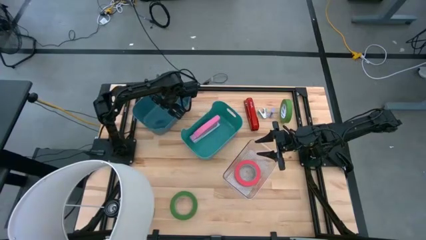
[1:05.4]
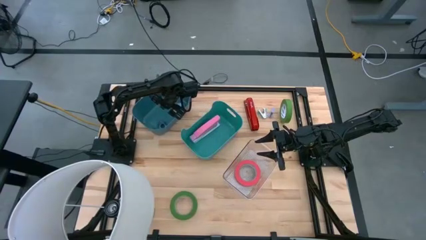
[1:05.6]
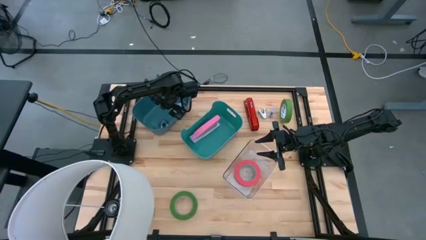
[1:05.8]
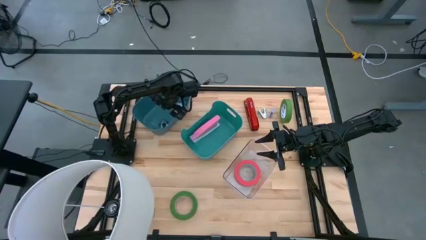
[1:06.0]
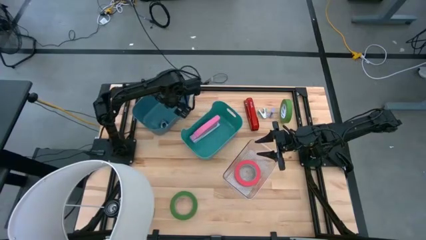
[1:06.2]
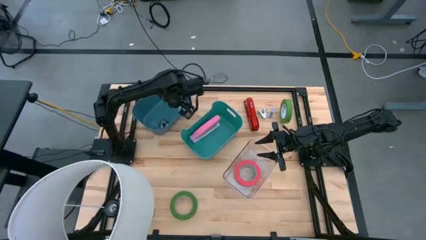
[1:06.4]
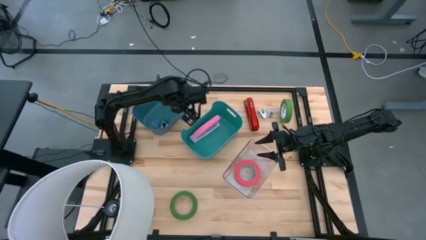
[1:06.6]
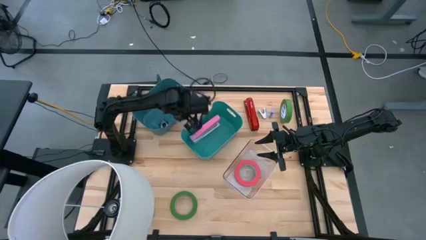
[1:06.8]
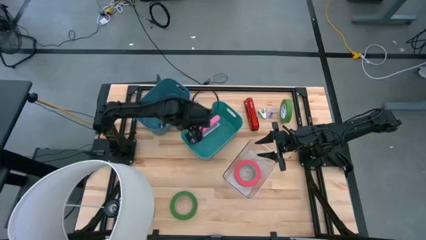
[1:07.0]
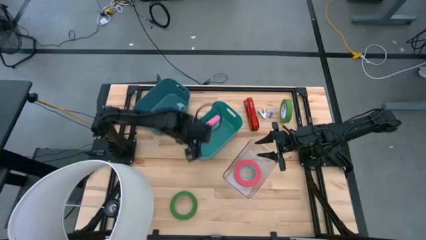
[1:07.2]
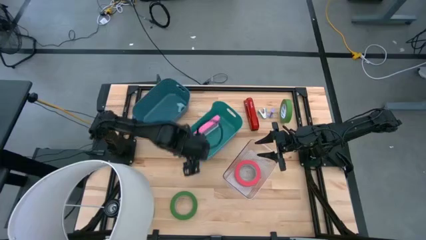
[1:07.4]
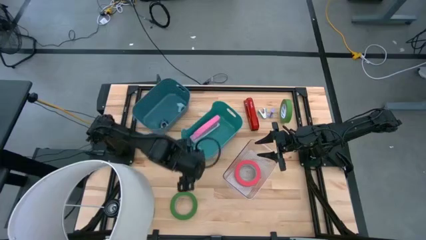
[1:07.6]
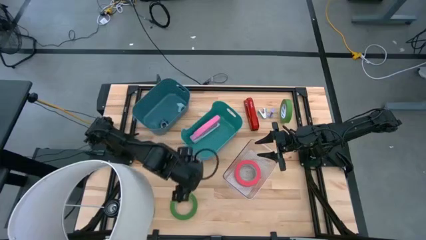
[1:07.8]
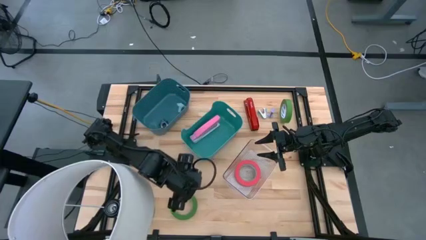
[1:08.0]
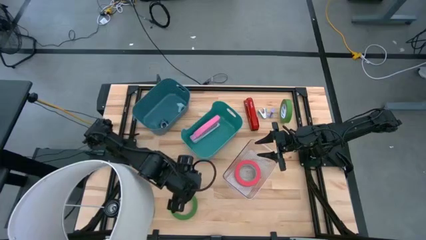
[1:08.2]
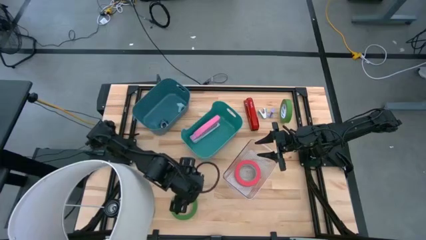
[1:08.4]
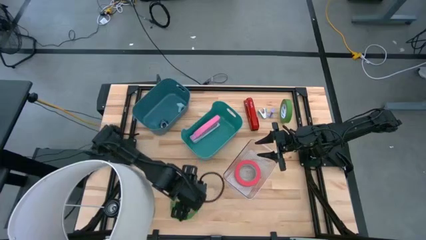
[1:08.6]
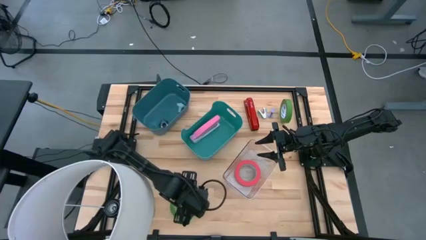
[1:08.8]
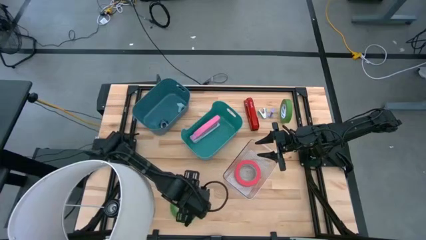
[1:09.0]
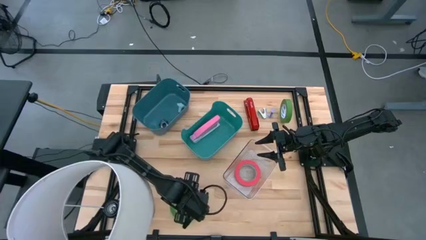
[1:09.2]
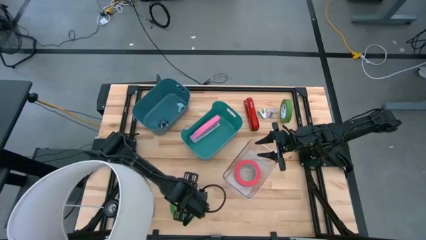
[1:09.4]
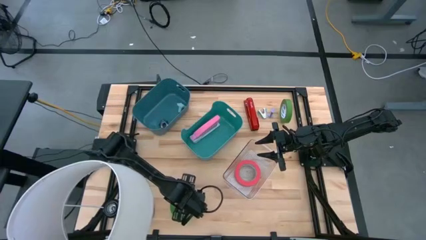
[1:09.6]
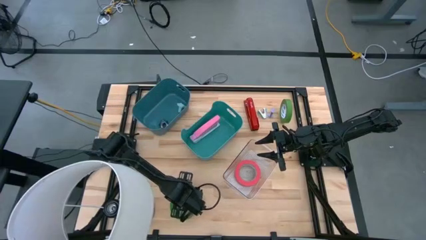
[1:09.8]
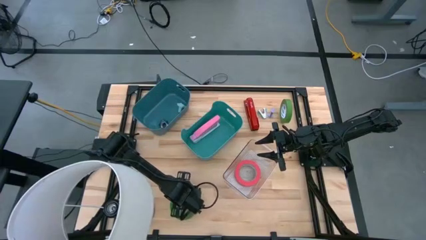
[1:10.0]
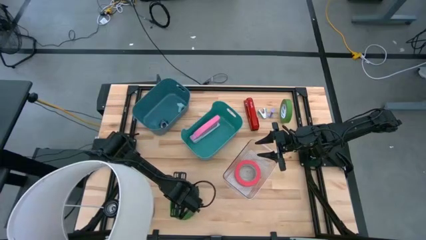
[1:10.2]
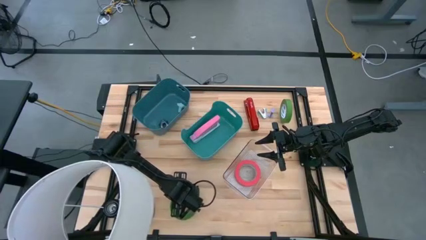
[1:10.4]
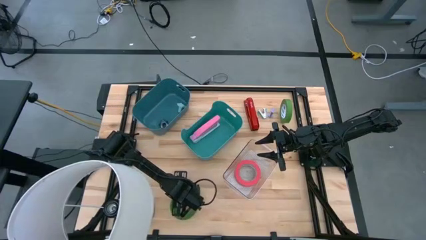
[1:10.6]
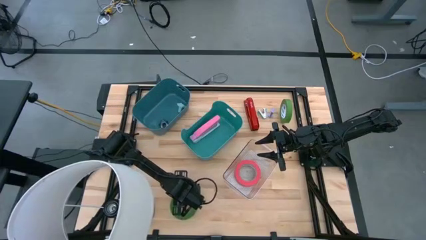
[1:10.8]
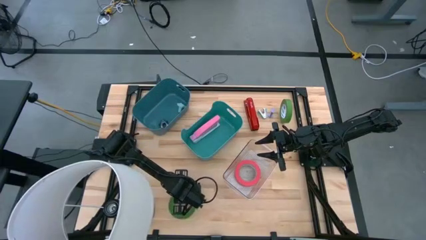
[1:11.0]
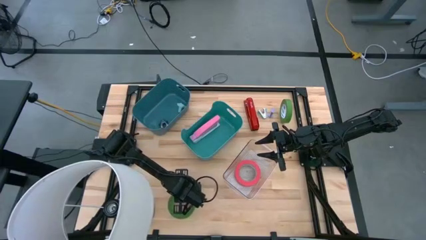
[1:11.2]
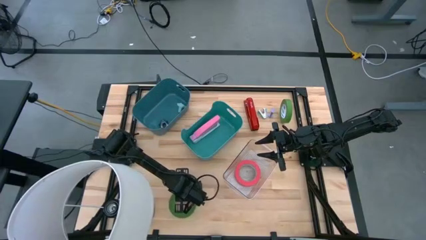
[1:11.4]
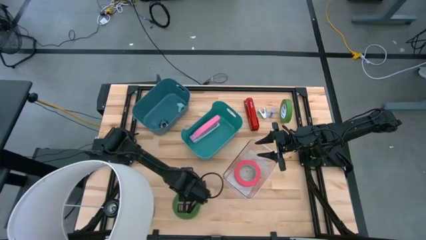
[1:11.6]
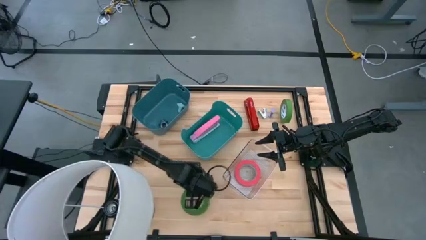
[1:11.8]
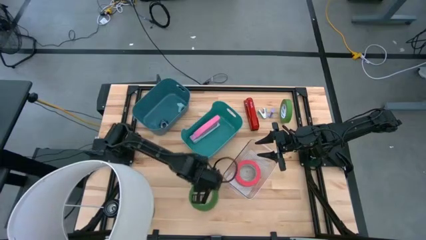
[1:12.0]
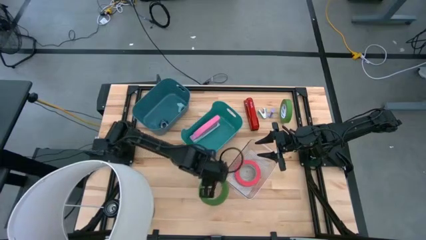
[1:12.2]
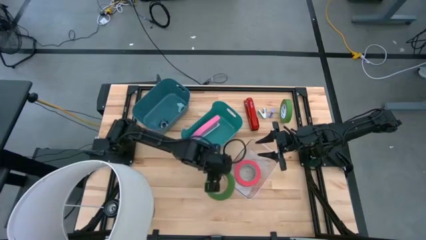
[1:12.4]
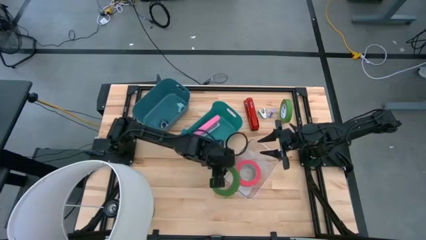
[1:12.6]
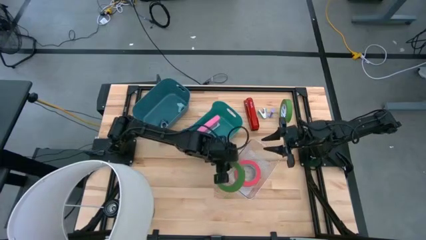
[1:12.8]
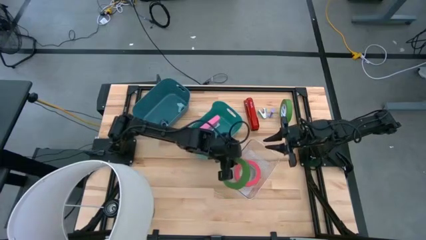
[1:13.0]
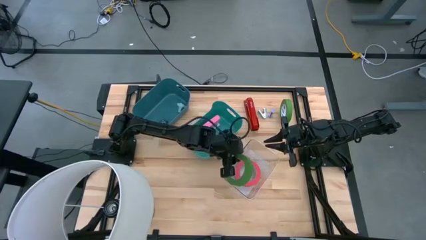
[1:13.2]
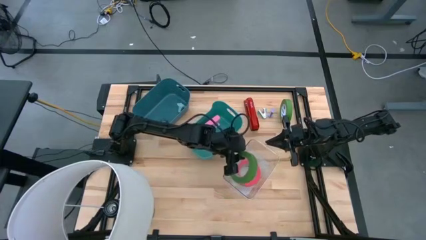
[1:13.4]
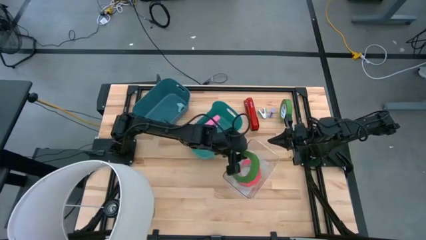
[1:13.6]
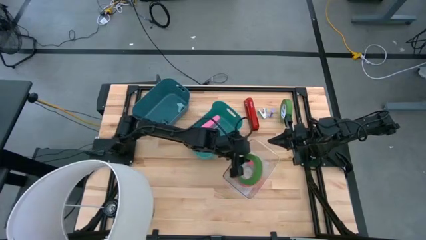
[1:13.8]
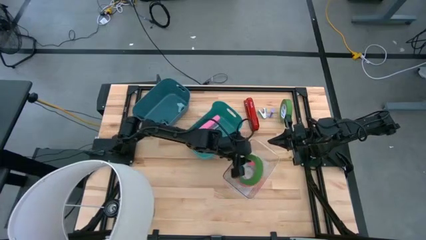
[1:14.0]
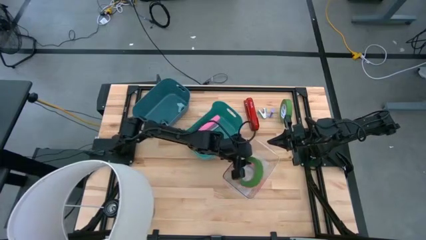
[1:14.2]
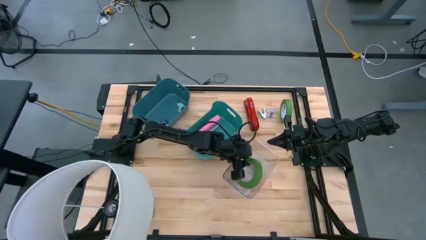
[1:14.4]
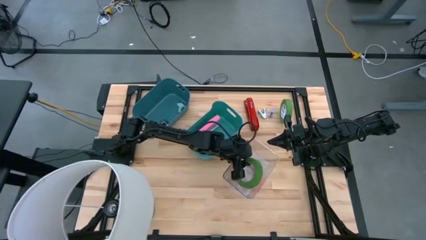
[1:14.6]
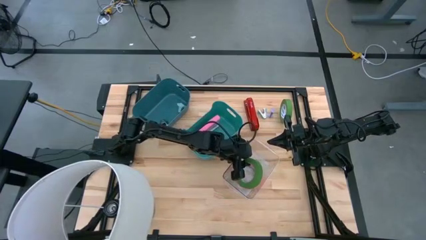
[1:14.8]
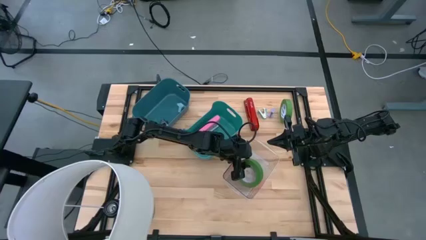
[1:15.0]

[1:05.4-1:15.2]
Task: Pick and place Stapler, Stapler remover, tape
Put the bottom left green tape into the transparent bin

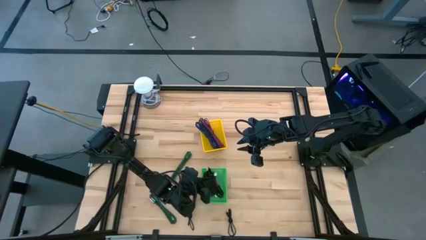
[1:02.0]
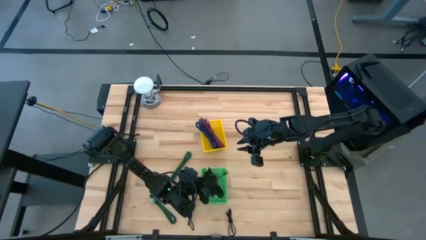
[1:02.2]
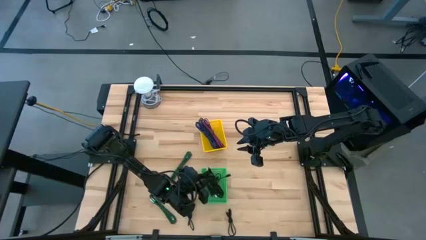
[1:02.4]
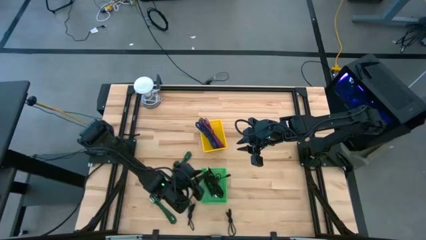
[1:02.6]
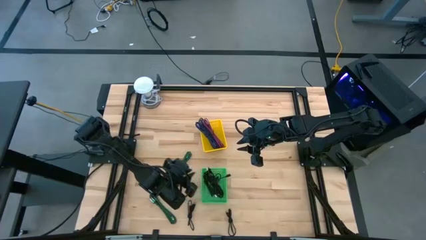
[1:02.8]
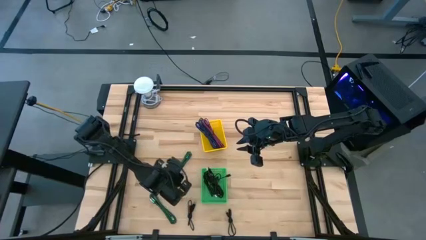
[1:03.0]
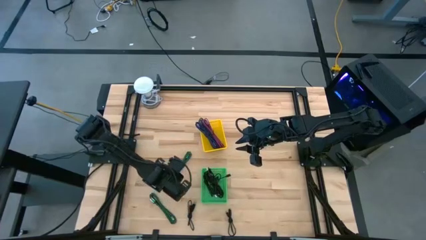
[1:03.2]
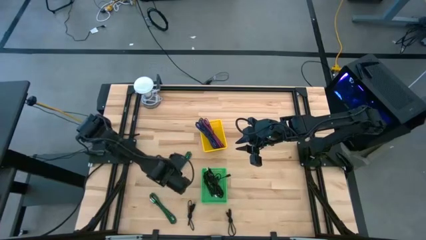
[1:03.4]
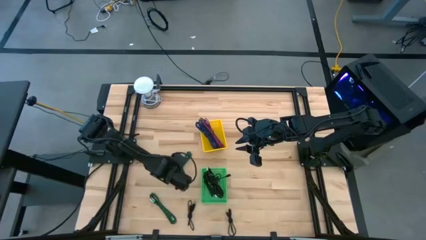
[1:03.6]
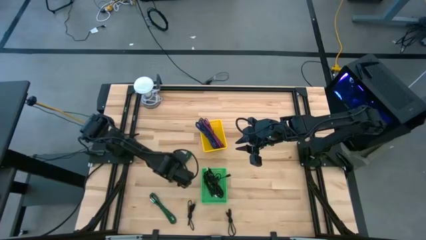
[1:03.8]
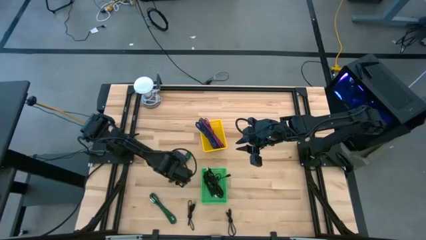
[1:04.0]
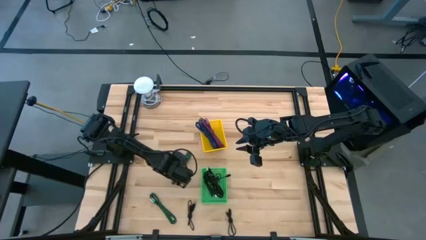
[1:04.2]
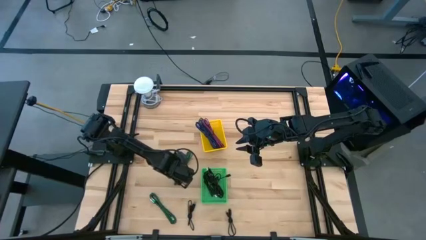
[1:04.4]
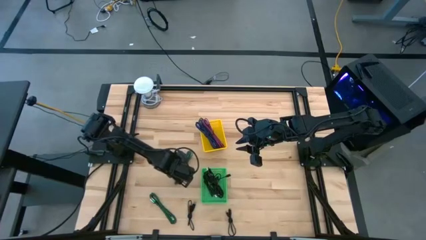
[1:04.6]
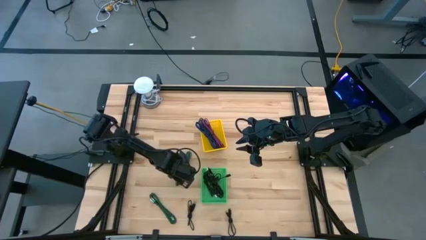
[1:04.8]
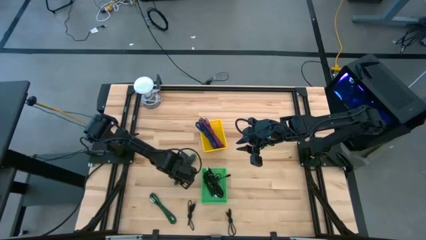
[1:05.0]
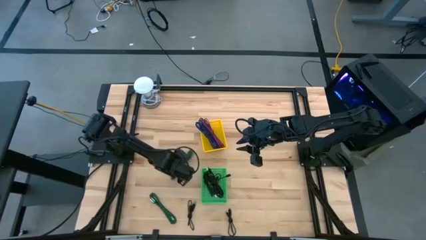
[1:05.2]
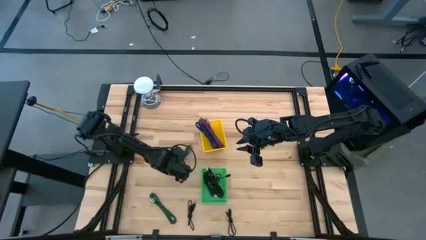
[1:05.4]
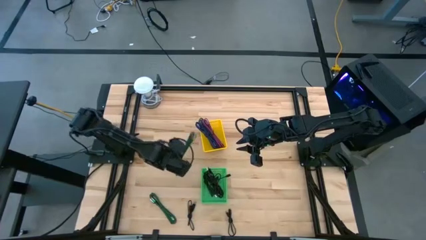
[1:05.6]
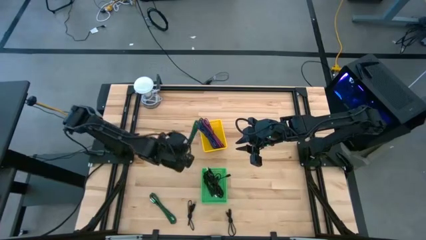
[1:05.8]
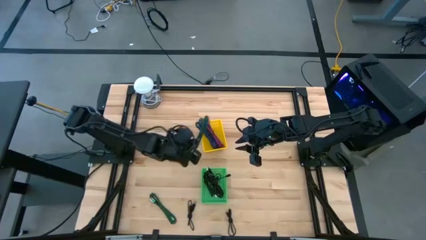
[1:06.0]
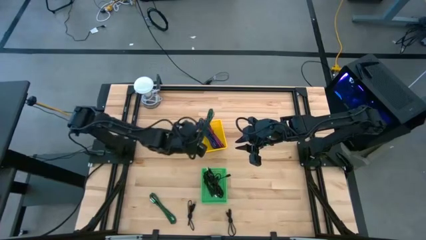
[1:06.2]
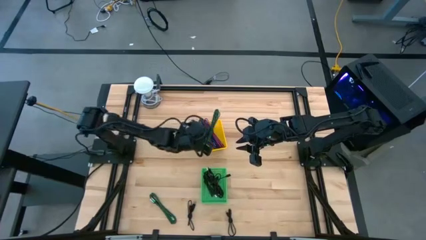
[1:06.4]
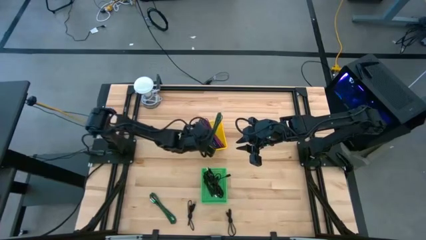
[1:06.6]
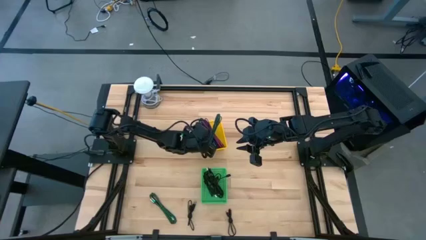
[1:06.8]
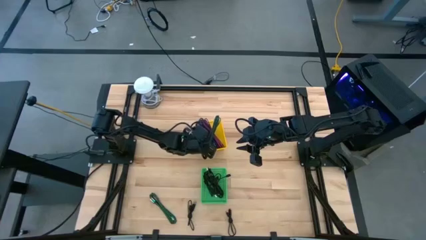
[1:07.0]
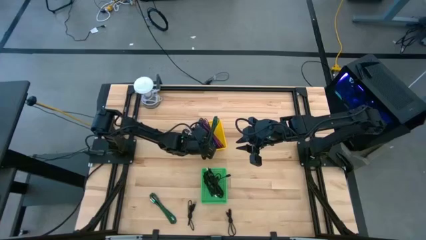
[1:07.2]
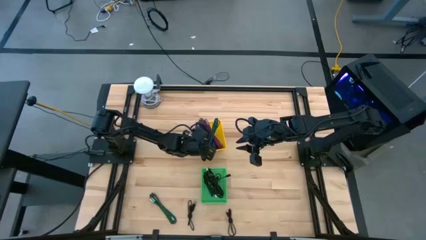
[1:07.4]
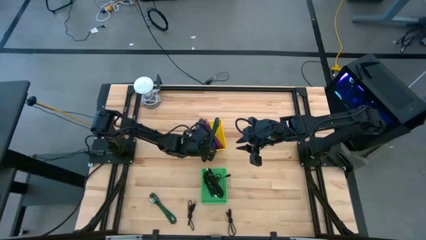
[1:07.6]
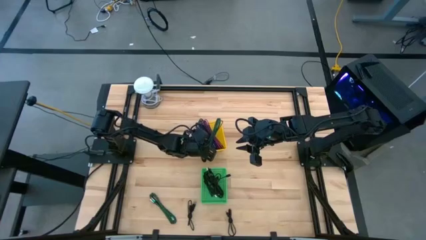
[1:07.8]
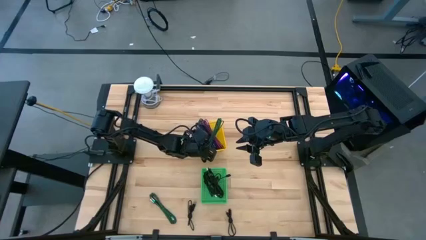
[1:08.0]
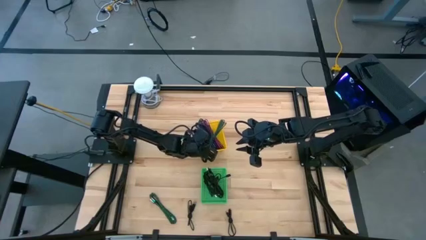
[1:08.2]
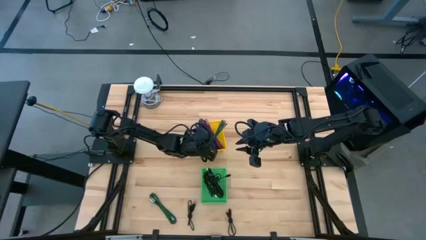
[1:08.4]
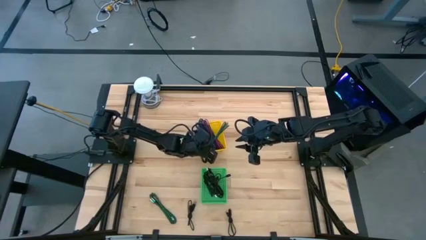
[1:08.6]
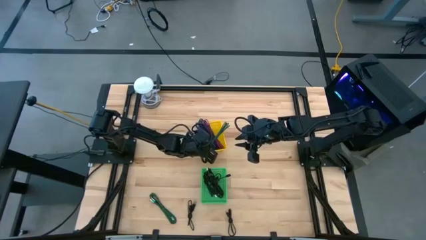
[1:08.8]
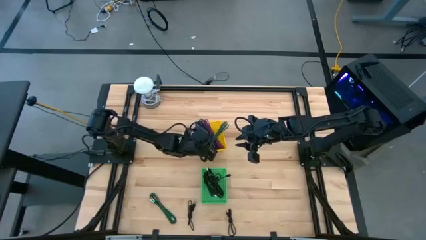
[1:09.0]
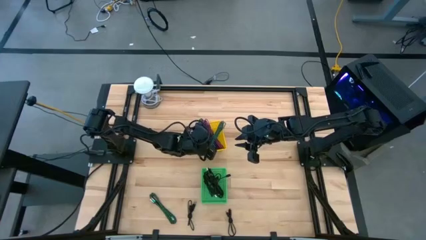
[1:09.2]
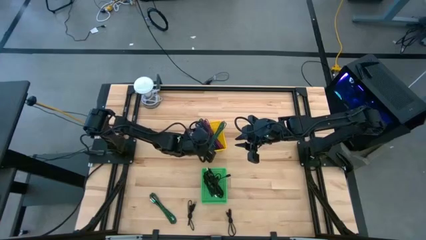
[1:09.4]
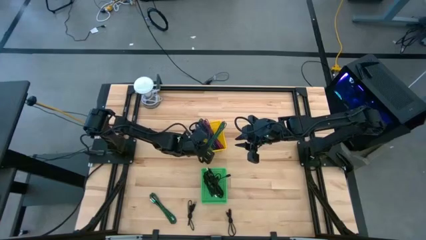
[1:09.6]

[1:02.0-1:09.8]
Task: Pick & Place USB Port
Put the black and green charger cable into the yellow bin
